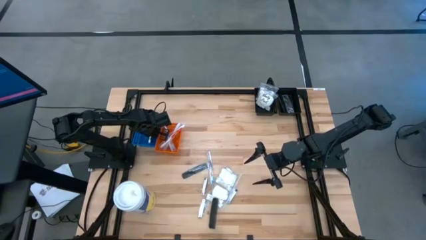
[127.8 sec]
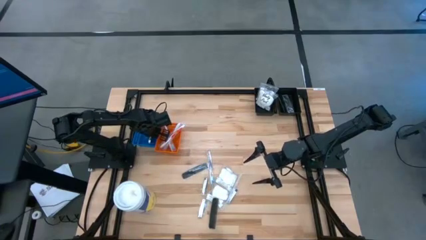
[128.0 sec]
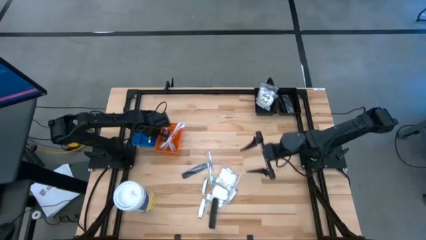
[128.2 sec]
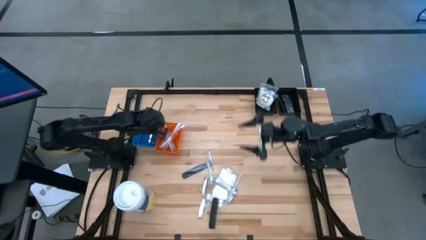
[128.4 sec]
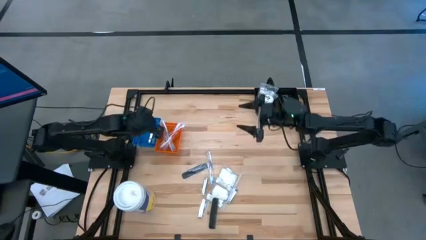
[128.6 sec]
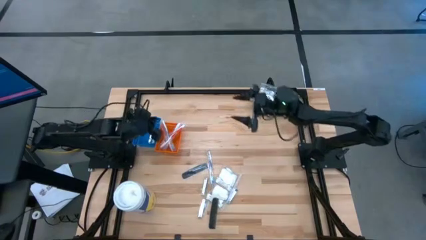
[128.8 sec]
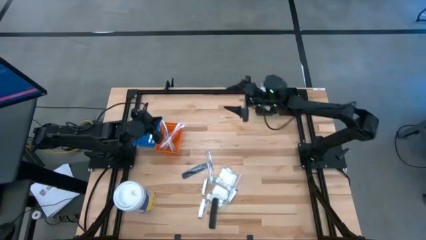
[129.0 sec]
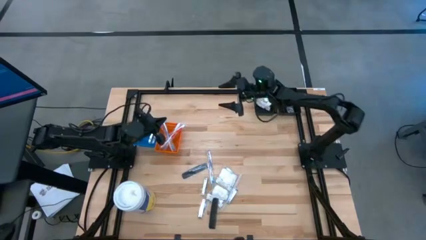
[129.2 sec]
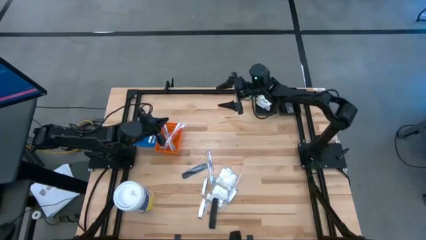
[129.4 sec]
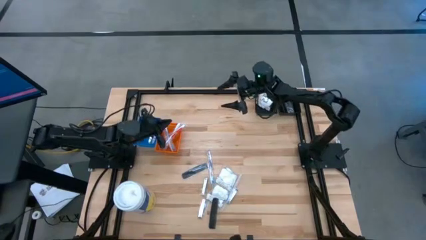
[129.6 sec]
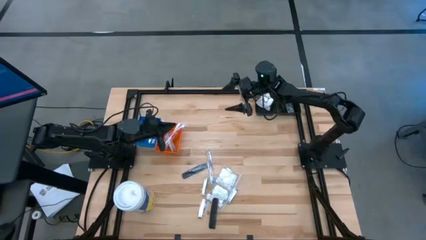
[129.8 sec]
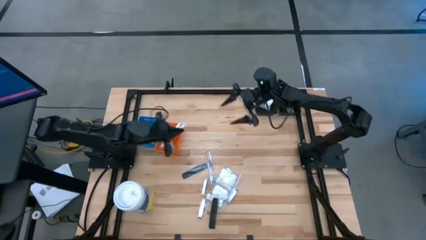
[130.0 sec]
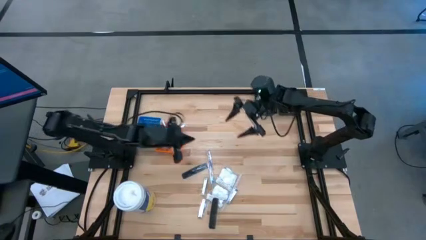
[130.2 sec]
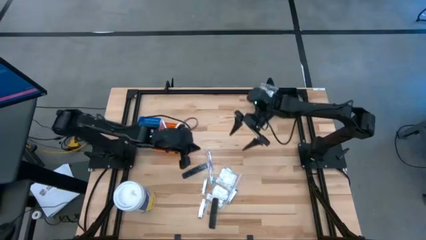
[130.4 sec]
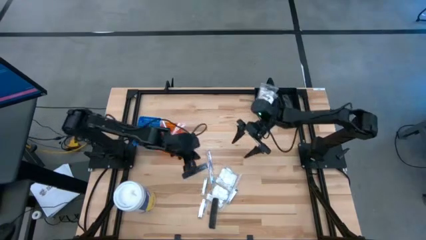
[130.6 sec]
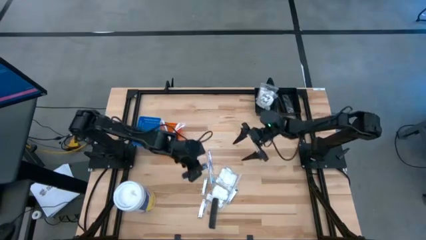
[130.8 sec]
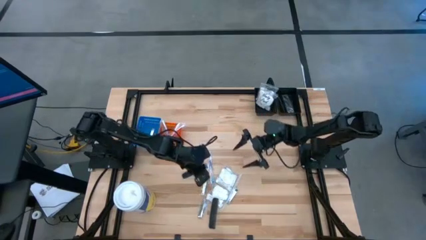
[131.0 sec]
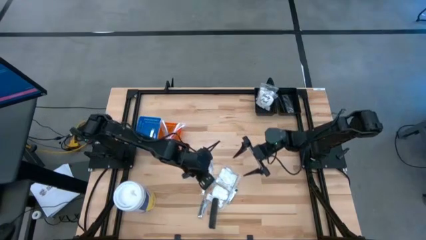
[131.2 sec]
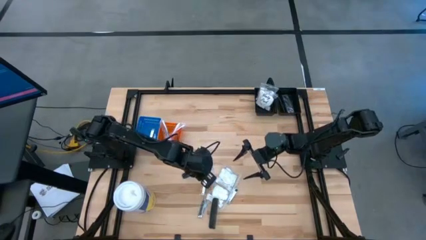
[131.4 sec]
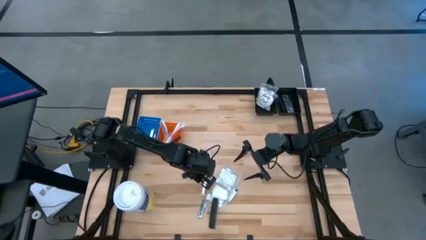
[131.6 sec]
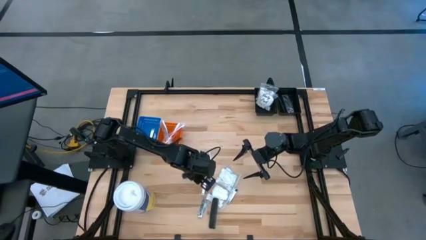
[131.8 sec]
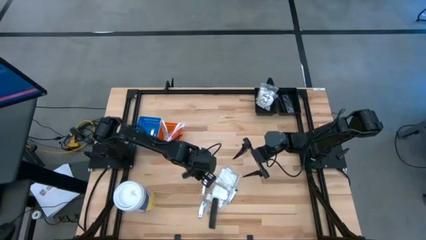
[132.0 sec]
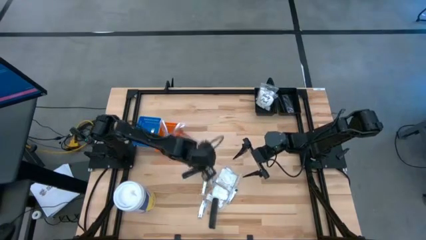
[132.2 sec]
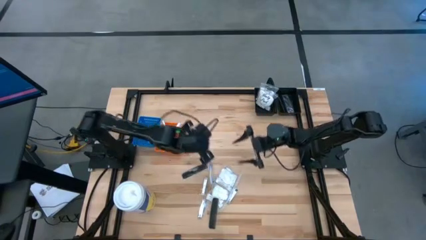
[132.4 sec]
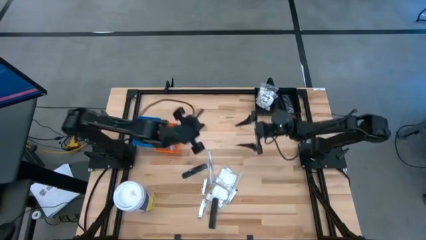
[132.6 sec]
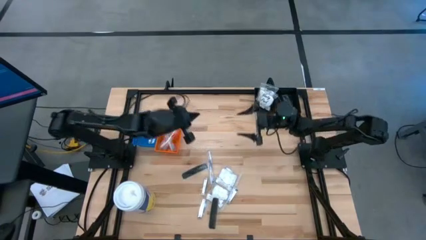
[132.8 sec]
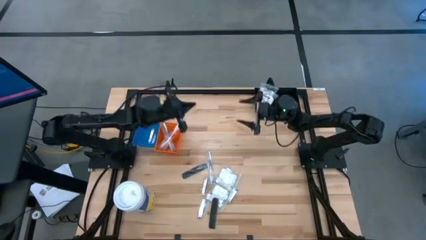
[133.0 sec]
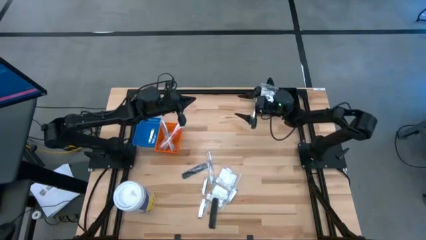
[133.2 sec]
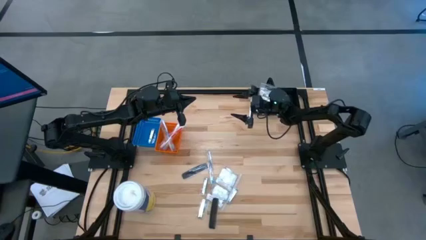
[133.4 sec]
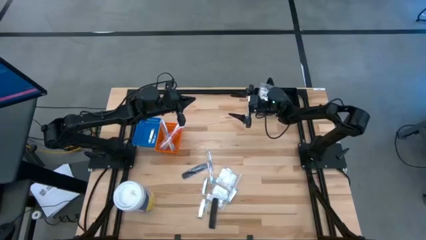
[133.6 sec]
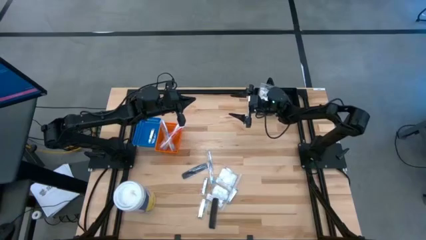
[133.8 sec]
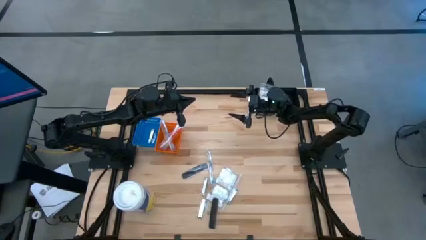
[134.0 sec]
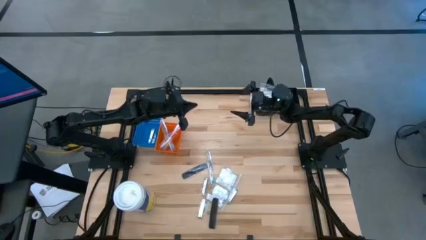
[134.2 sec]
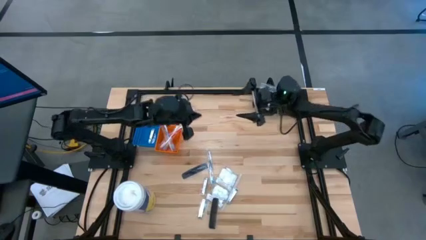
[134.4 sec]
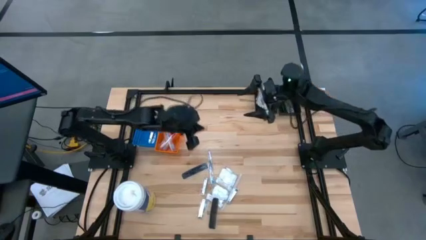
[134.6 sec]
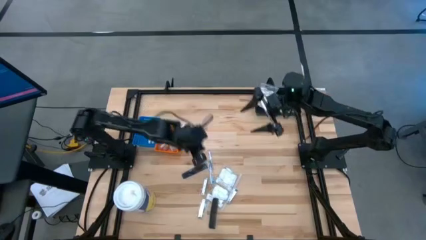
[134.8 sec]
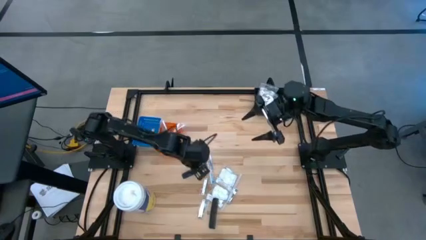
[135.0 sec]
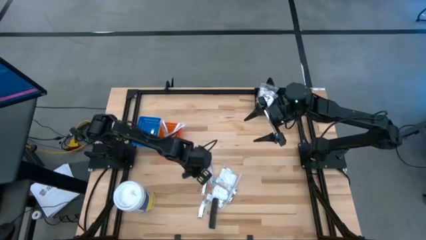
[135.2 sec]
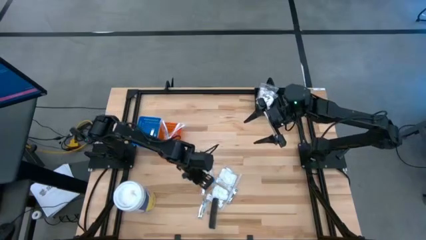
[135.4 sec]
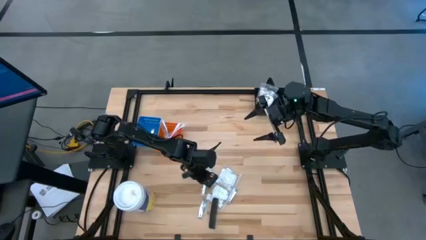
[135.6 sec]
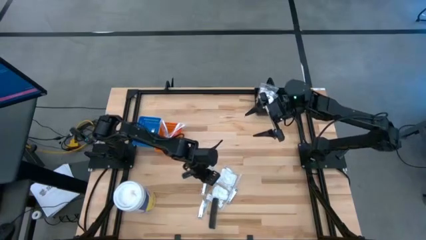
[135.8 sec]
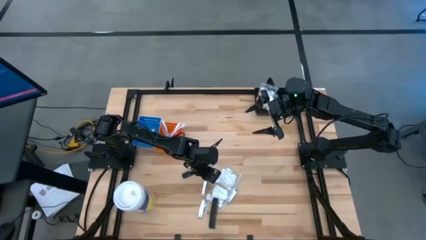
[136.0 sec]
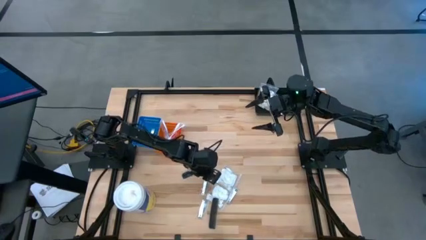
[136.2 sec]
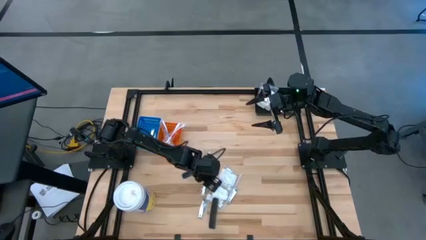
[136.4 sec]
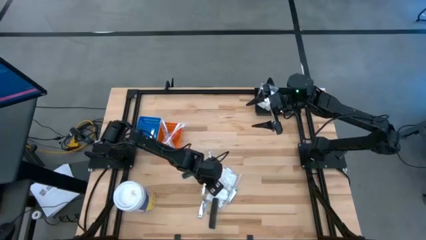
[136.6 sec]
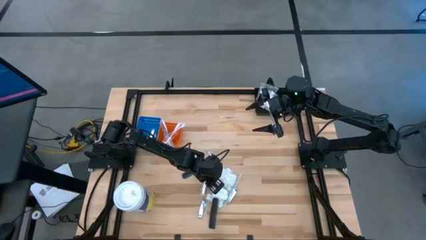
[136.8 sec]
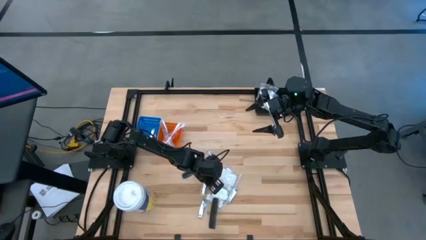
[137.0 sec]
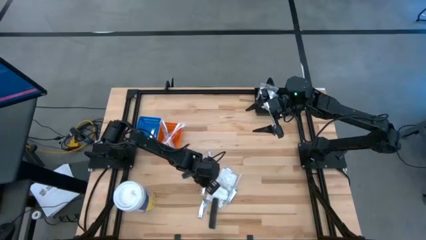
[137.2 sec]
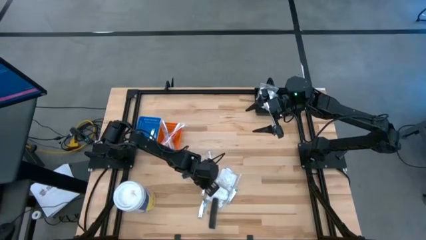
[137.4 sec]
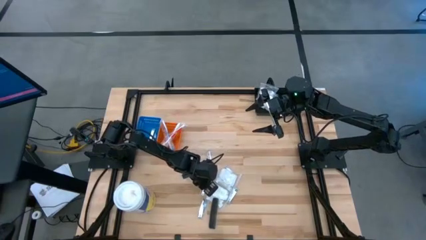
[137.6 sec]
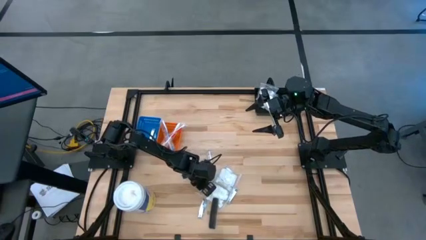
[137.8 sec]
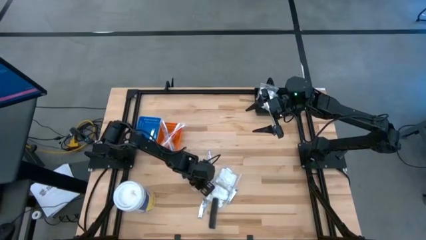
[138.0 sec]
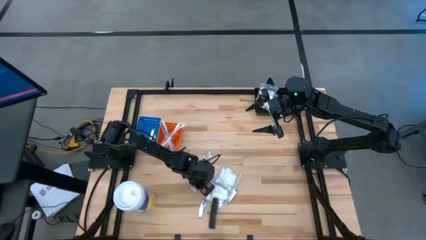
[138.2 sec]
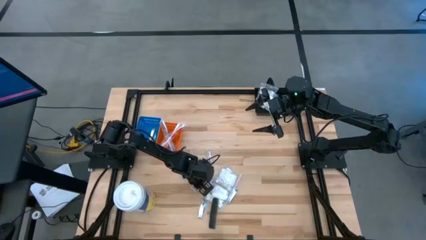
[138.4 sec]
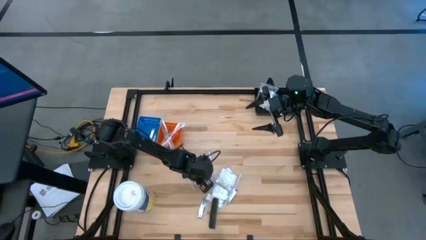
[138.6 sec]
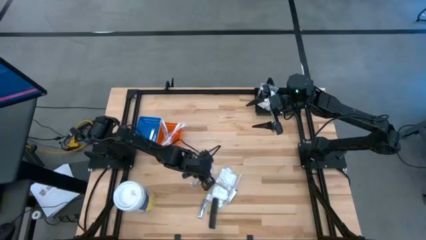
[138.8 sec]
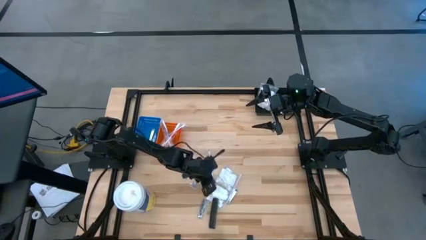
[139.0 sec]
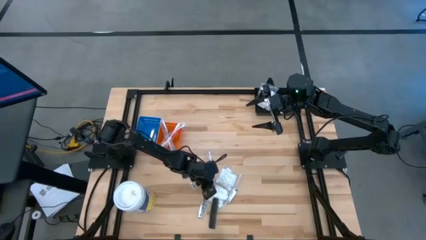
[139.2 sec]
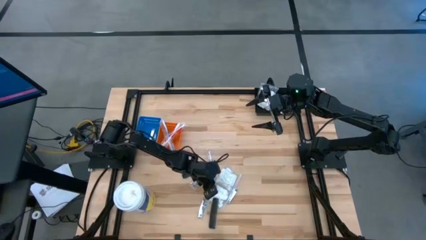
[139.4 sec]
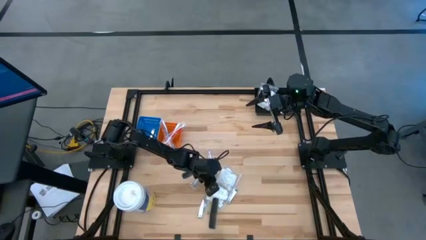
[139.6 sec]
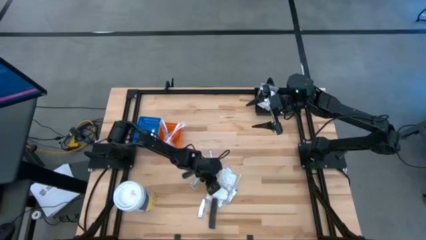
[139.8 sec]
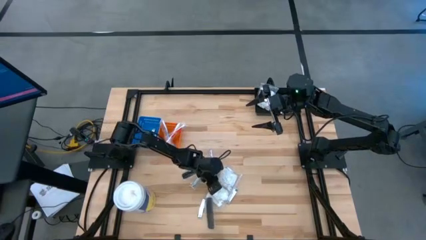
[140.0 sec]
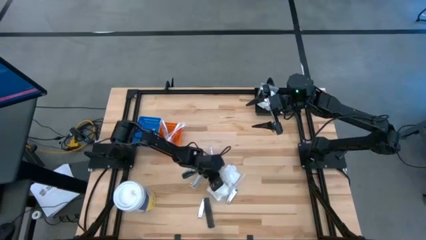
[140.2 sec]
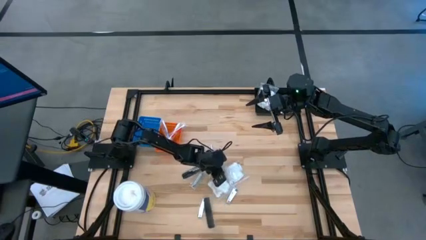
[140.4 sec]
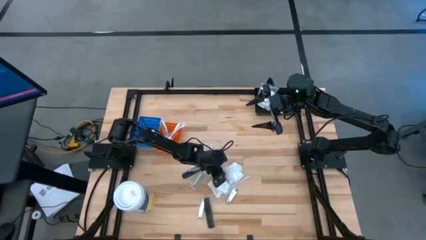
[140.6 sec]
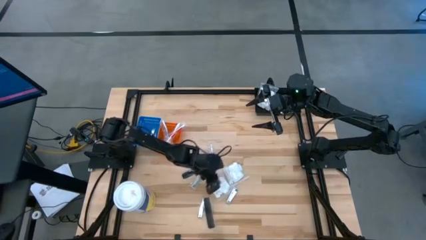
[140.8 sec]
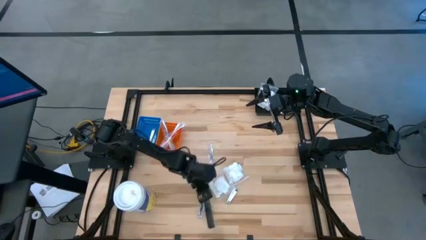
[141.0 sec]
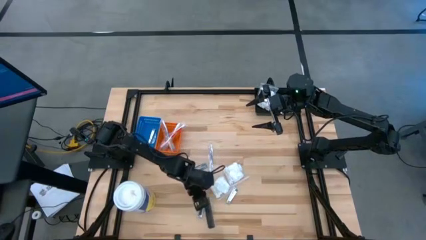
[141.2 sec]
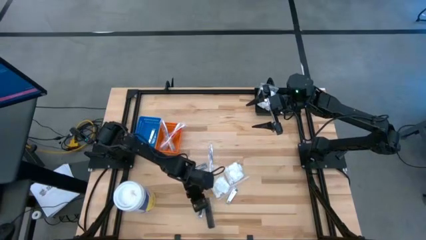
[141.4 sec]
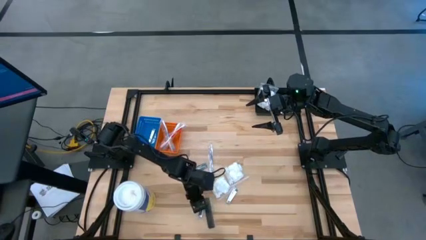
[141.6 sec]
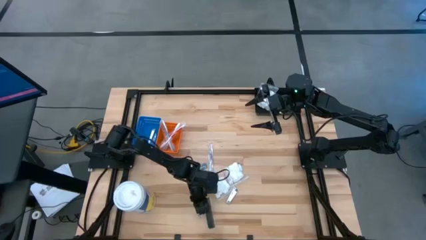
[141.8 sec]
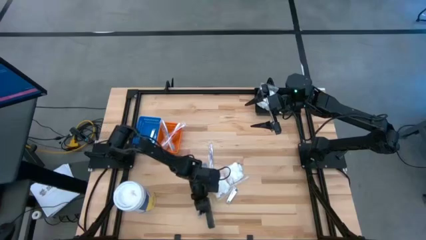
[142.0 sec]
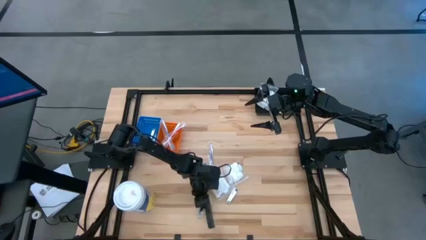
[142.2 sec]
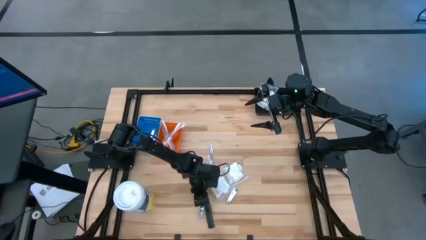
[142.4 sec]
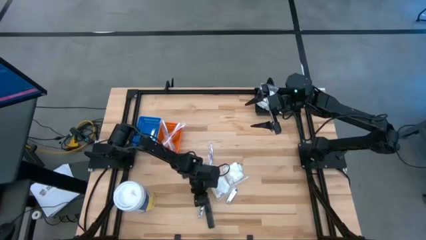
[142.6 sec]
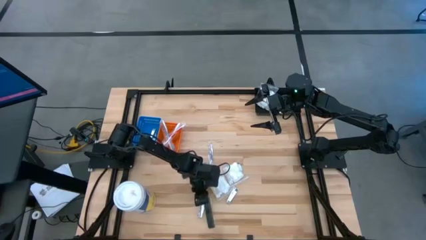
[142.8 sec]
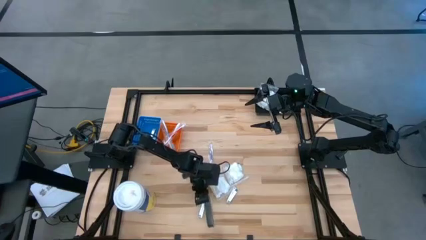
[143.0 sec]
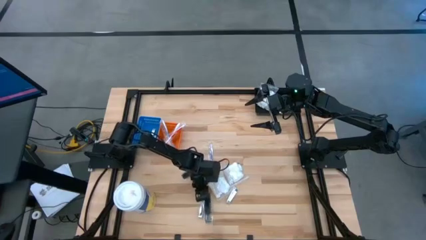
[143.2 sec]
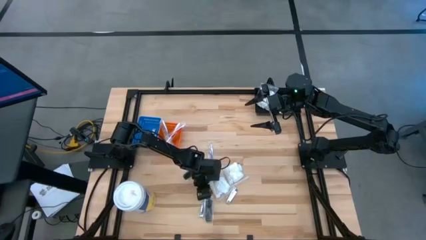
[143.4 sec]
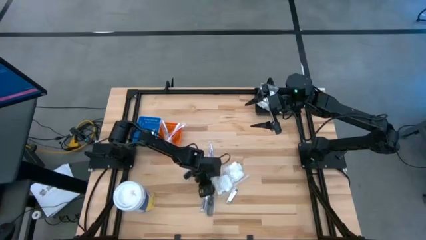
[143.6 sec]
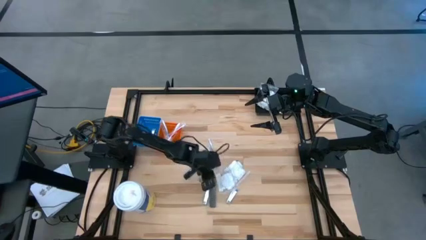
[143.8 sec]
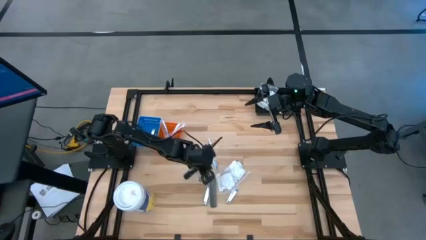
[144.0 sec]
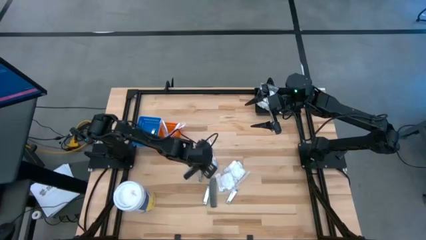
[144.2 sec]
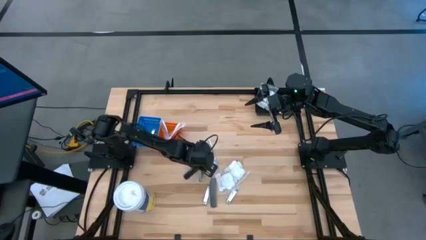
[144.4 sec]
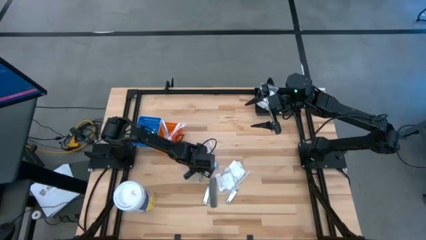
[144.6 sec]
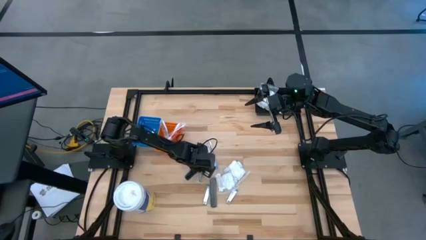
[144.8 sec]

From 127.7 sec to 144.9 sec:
Task: Pick & Place Travel size toiletries
Adjust the hygiene items on the table
